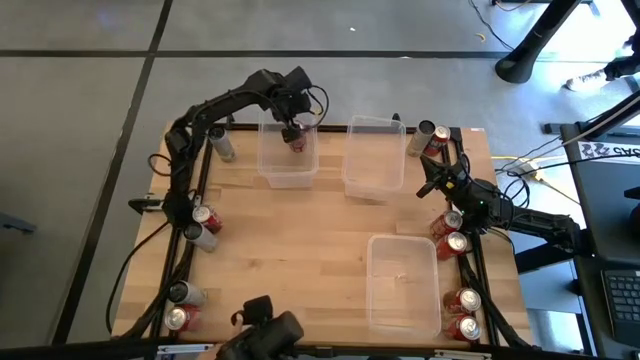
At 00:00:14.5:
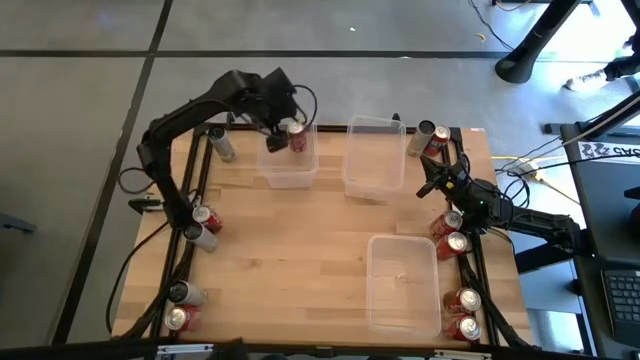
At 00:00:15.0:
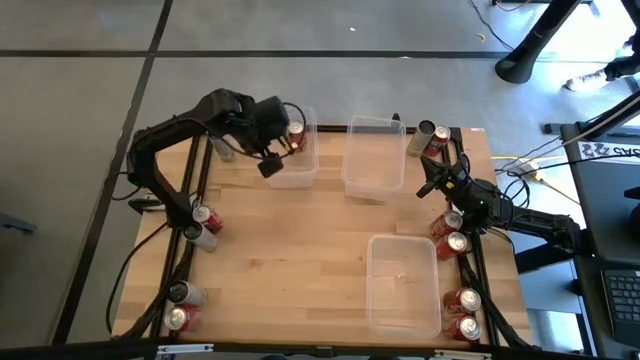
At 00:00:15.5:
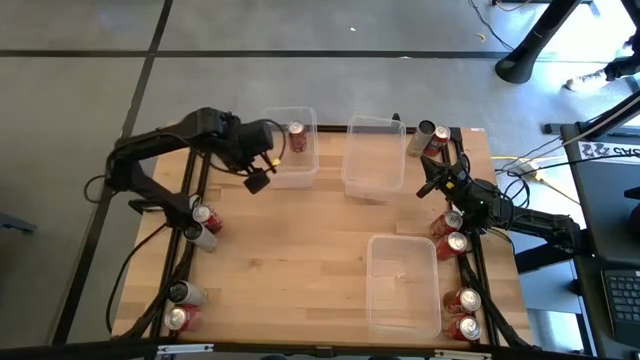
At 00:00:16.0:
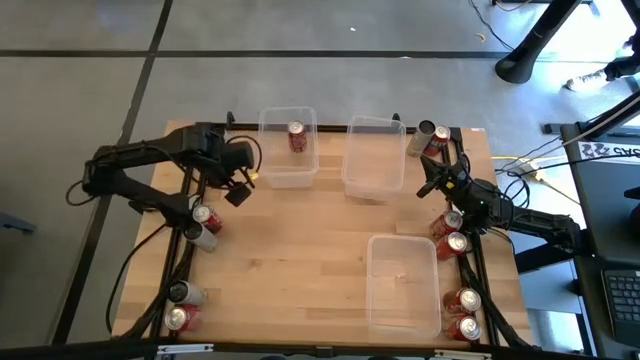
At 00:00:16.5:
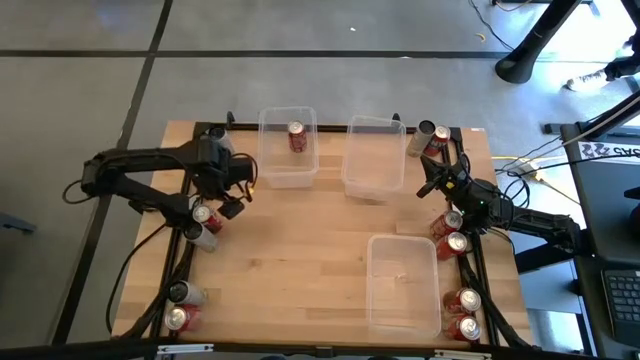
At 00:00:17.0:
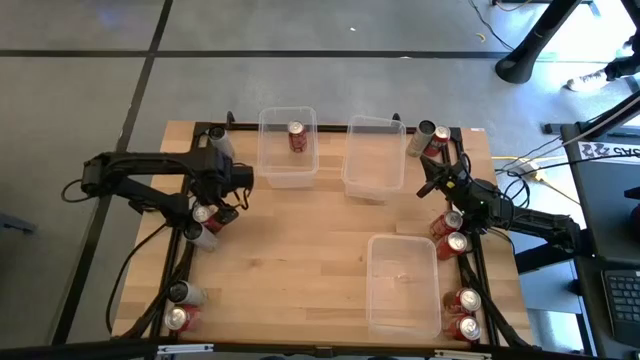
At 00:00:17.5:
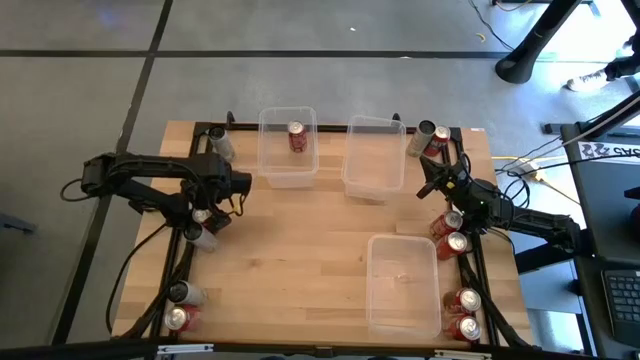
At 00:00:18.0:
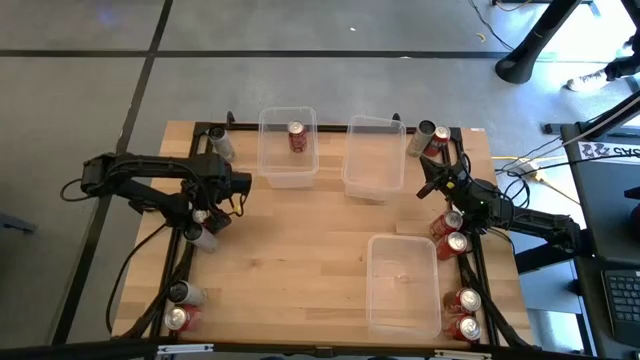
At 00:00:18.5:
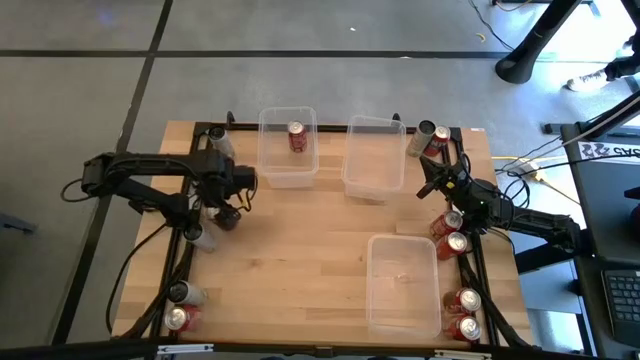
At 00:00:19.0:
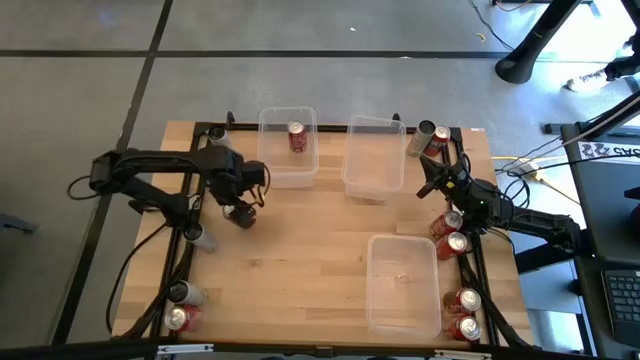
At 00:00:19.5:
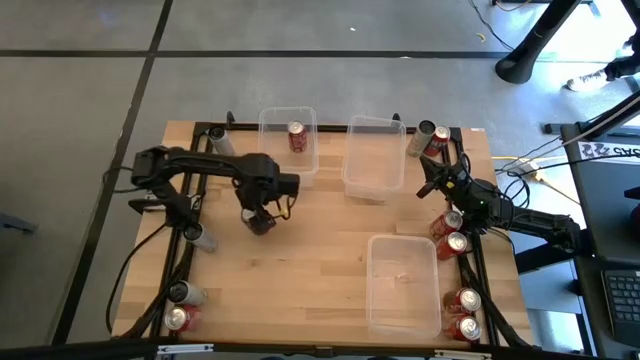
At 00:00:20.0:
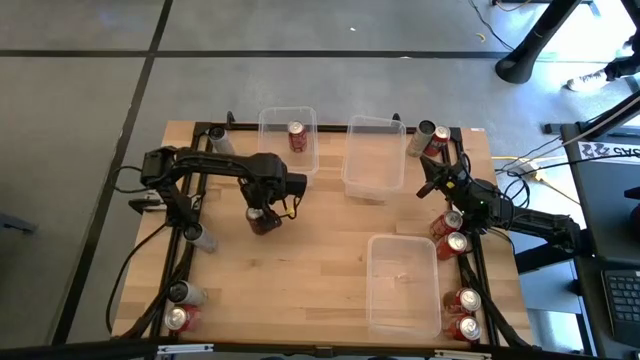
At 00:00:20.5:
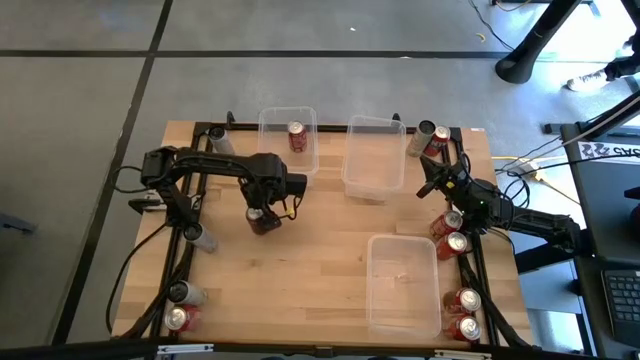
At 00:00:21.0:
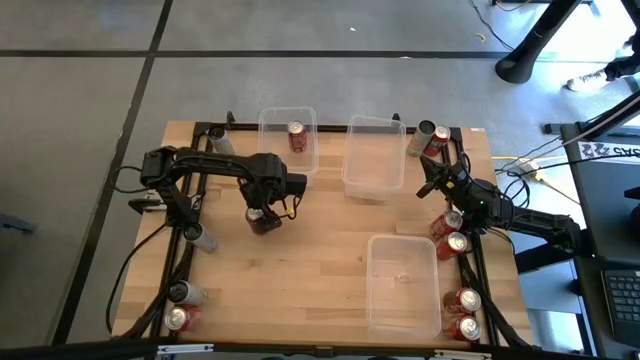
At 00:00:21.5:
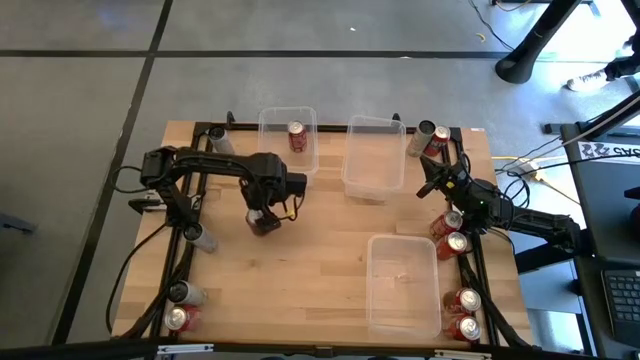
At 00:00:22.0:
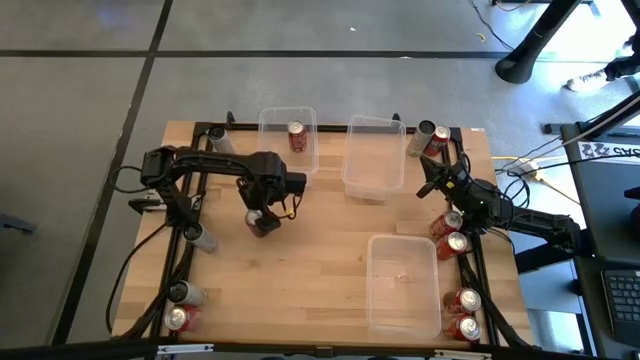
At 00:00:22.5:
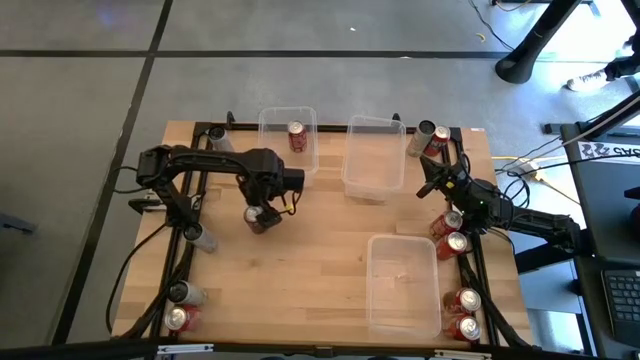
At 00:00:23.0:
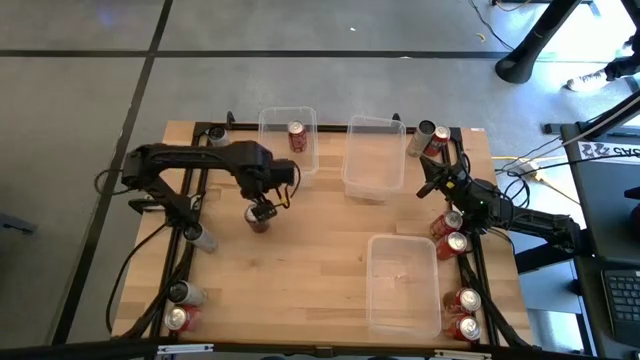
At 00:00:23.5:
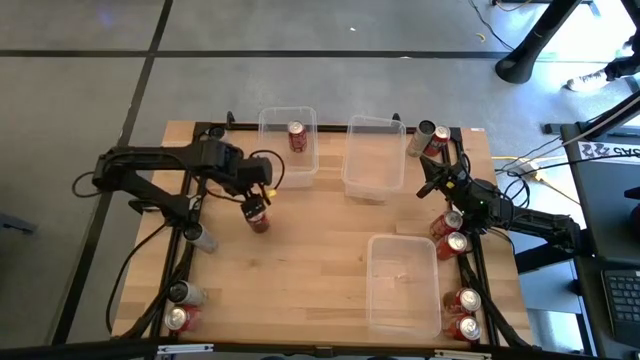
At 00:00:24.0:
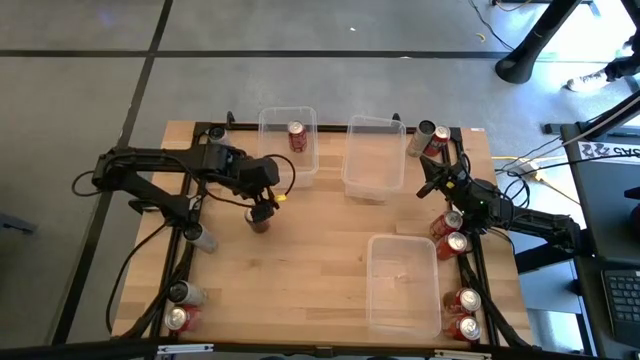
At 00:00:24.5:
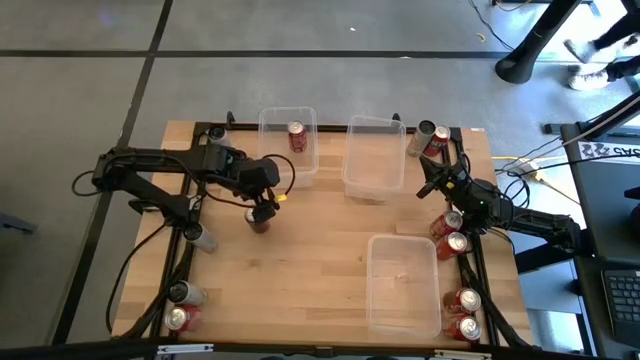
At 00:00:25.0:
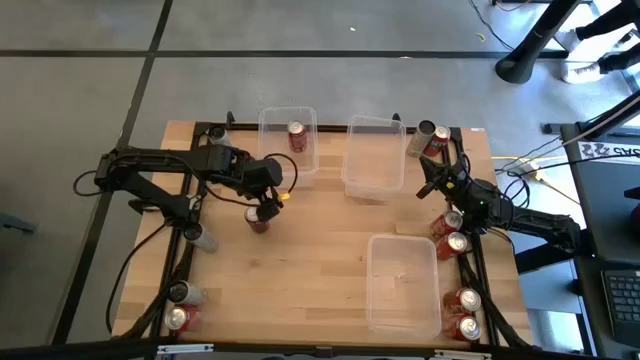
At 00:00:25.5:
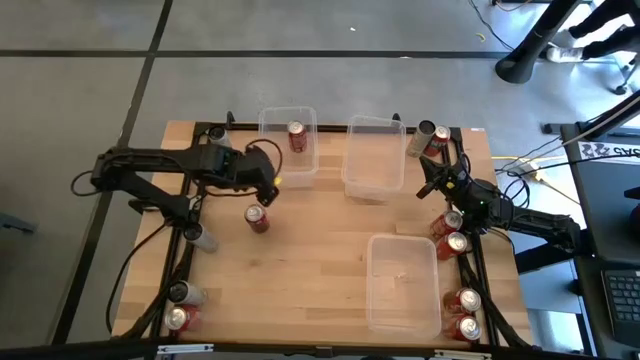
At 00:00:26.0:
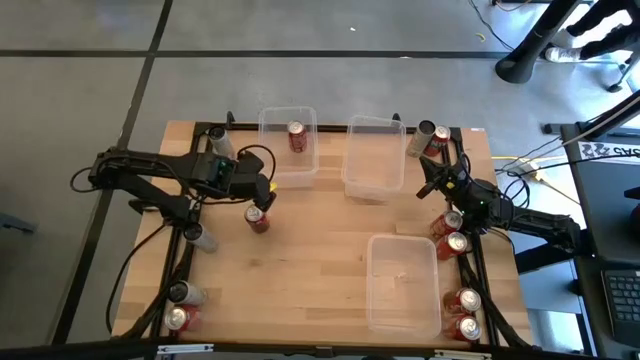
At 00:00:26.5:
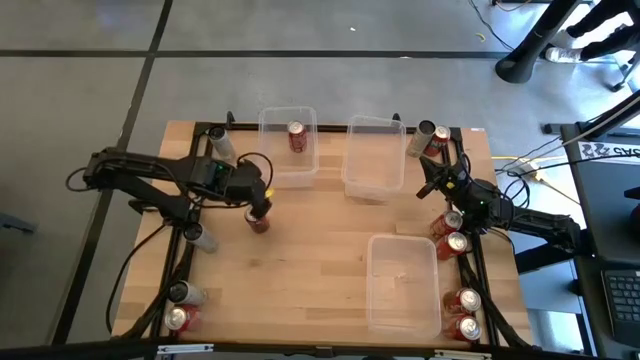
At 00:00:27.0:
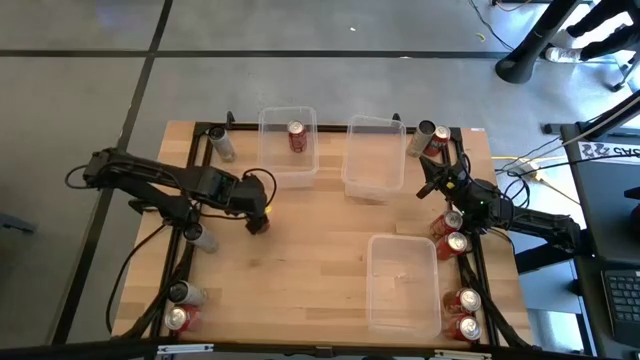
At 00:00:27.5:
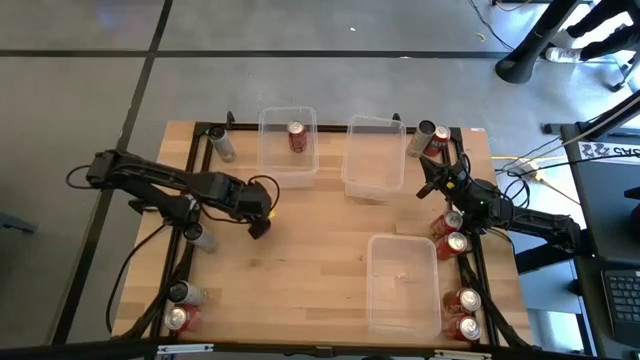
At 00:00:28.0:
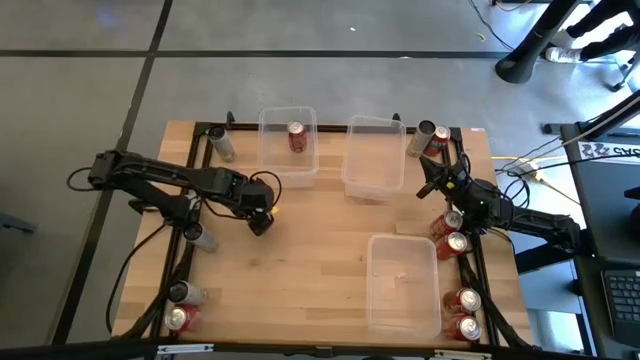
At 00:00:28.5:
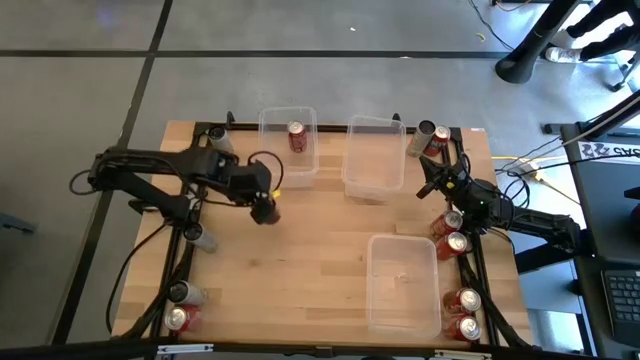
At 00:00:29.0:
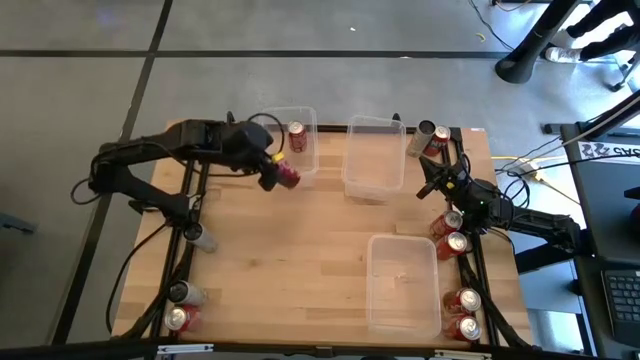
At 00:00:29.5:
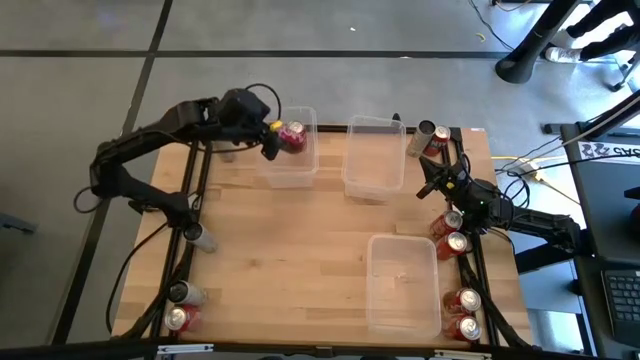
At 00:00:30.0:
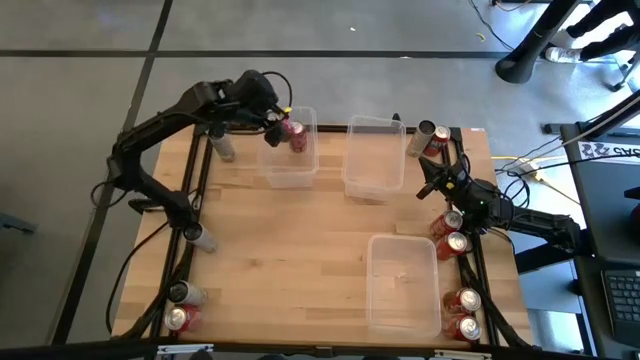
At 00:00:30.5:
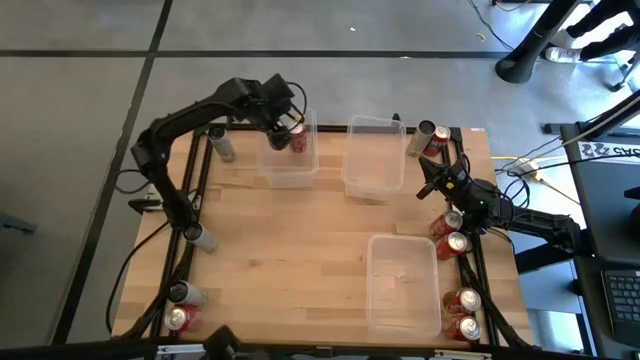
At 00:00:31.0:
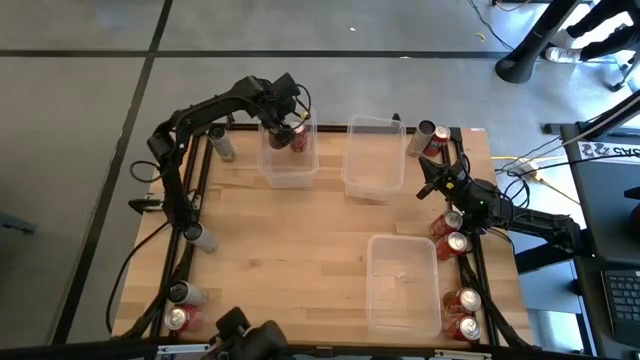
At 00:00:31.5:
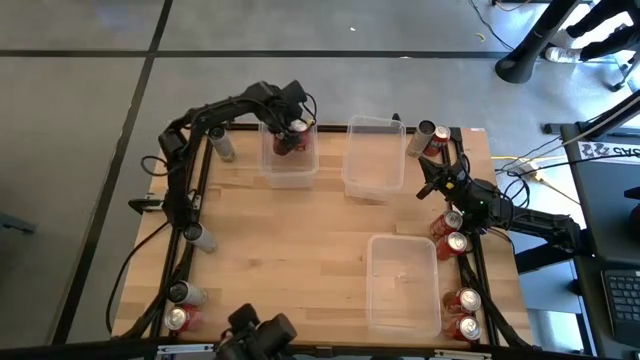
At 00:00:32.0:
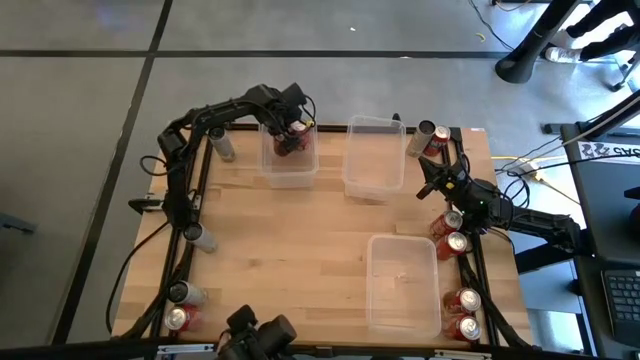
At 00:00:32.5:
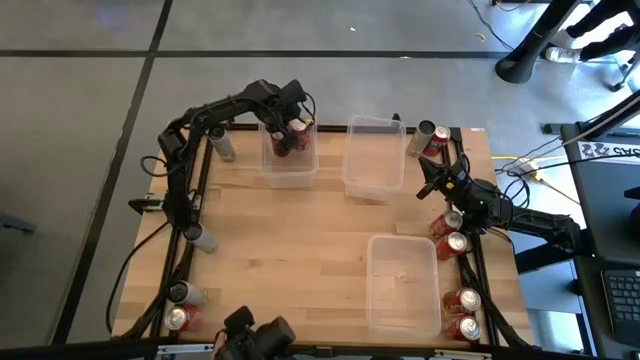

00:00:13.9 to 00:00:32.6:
Task: Sort soda cans
Put the top left red soda can into the top left transparent bin aligned with the other red soda can
